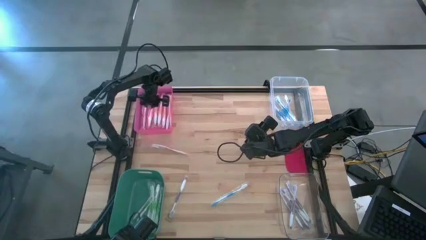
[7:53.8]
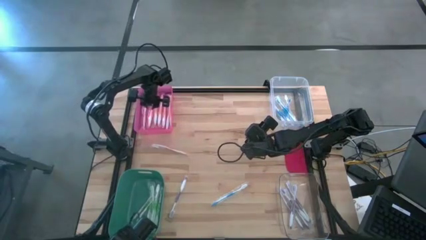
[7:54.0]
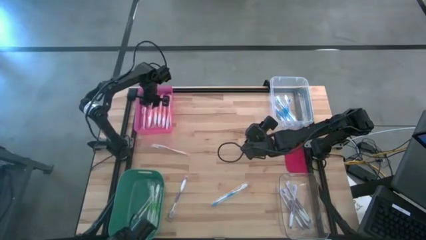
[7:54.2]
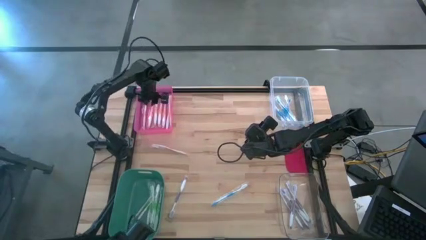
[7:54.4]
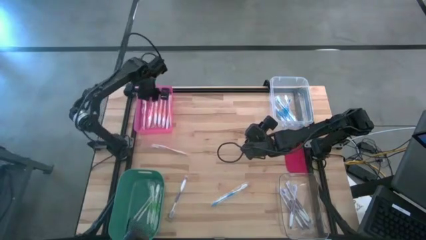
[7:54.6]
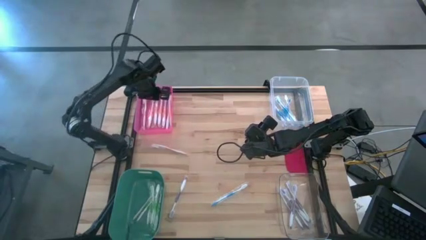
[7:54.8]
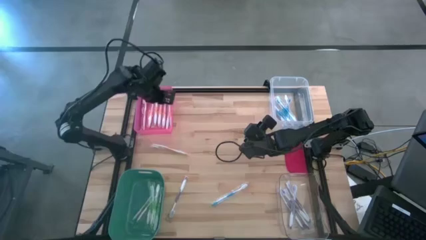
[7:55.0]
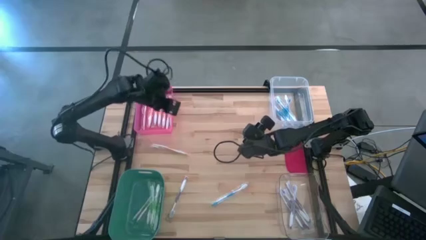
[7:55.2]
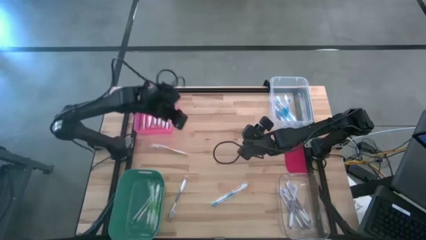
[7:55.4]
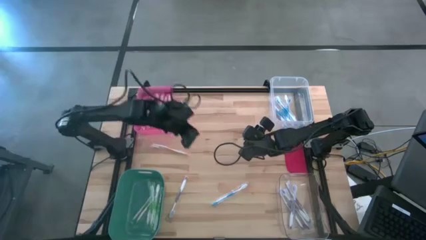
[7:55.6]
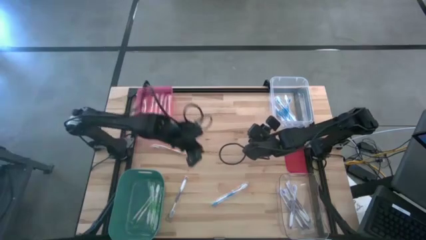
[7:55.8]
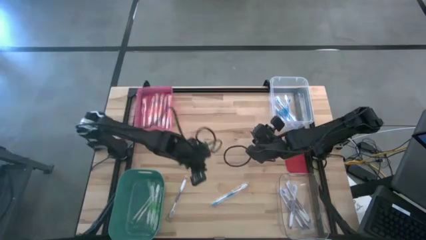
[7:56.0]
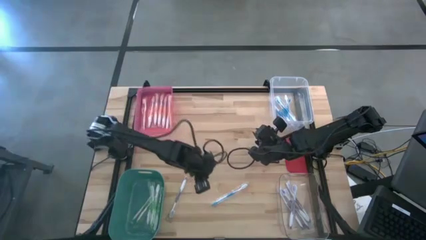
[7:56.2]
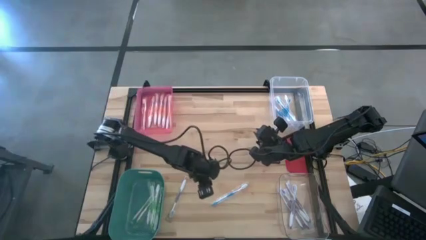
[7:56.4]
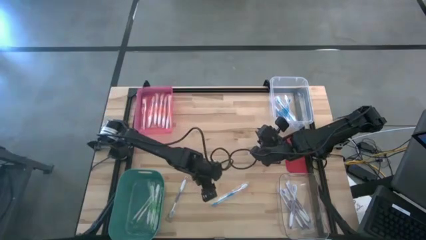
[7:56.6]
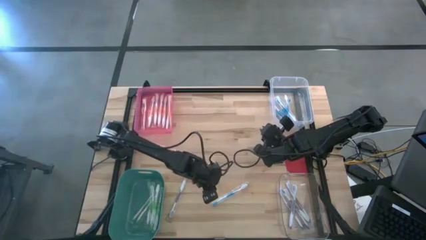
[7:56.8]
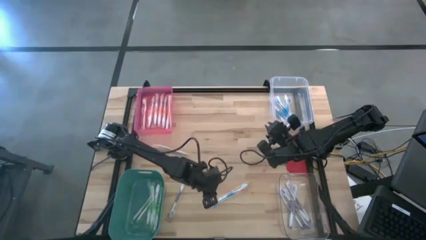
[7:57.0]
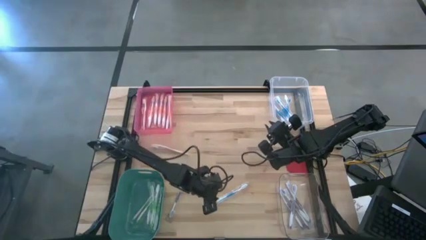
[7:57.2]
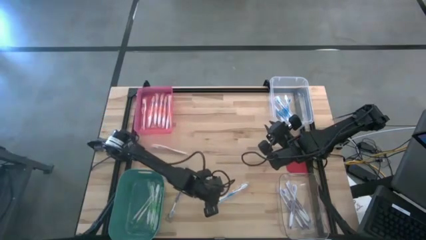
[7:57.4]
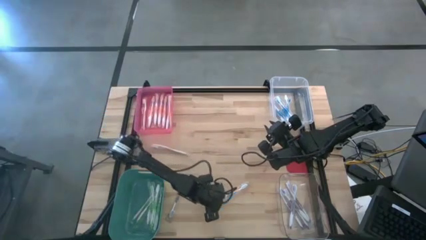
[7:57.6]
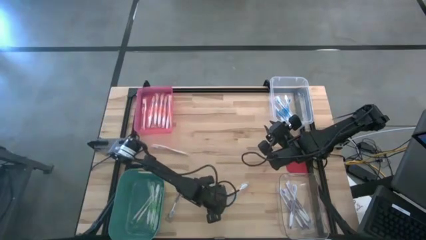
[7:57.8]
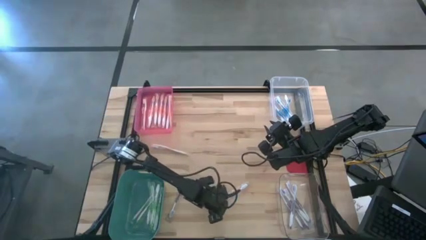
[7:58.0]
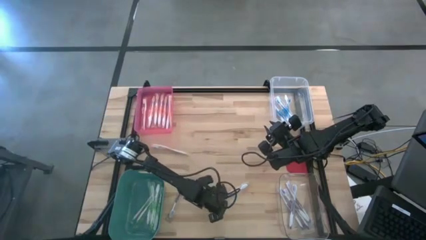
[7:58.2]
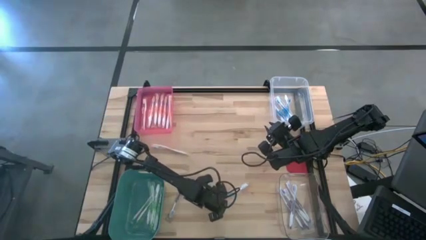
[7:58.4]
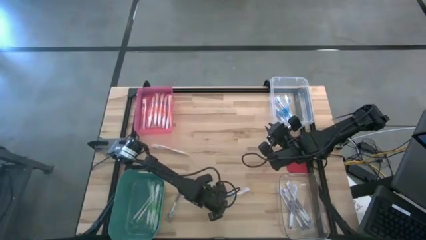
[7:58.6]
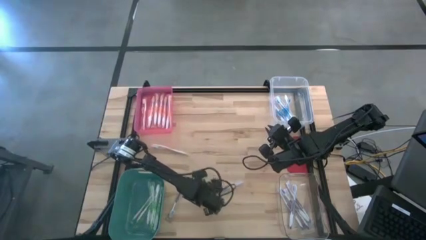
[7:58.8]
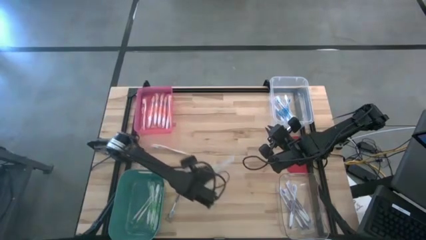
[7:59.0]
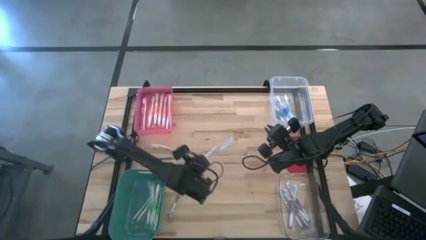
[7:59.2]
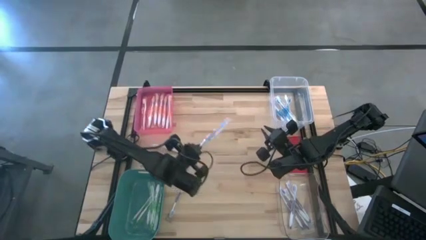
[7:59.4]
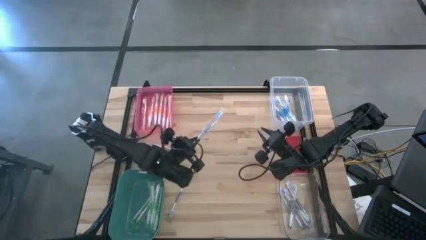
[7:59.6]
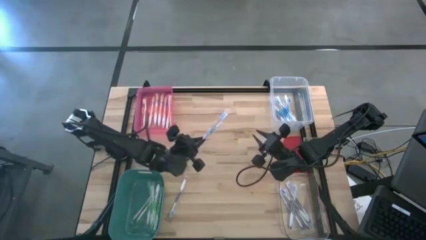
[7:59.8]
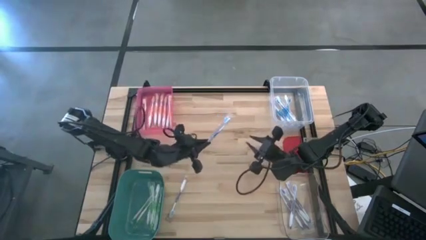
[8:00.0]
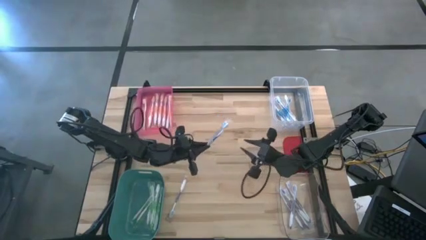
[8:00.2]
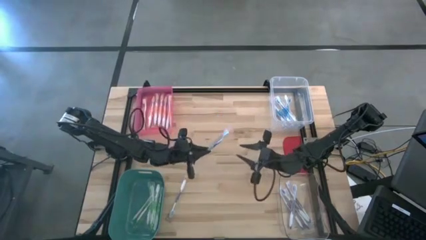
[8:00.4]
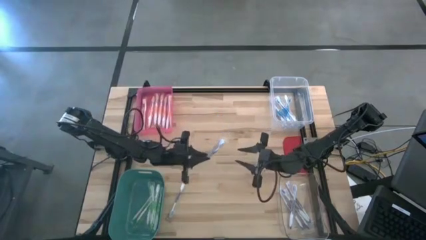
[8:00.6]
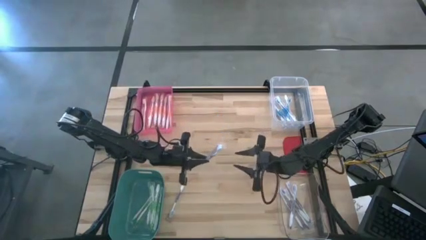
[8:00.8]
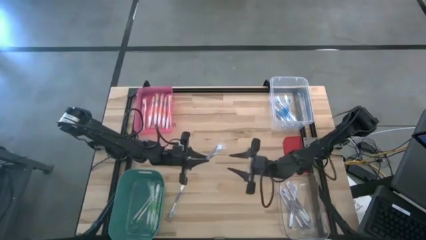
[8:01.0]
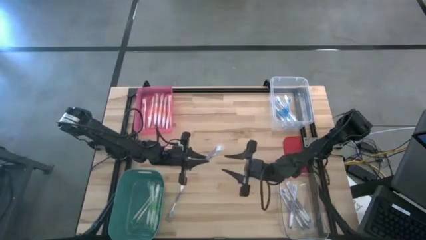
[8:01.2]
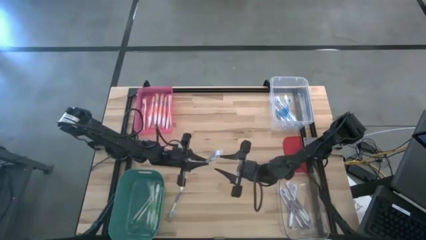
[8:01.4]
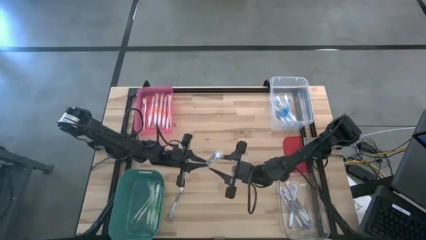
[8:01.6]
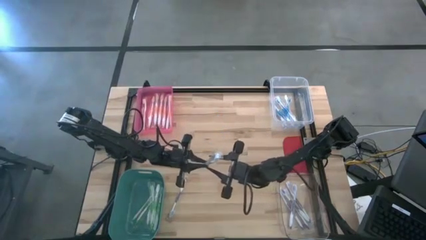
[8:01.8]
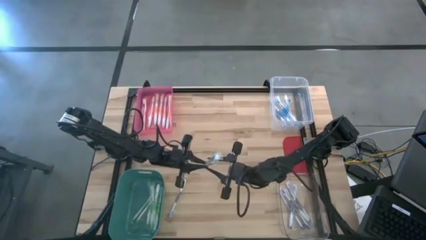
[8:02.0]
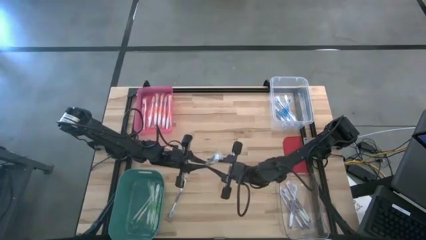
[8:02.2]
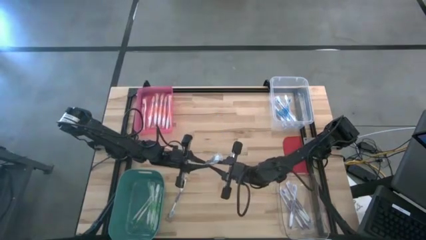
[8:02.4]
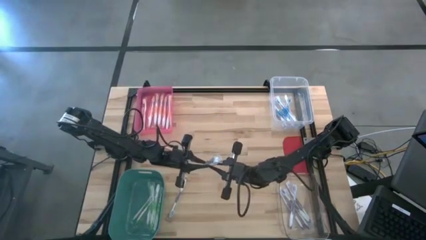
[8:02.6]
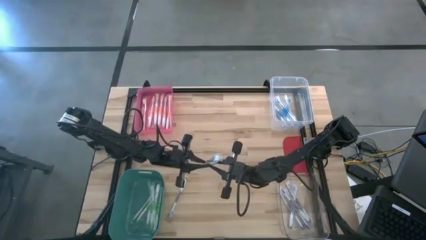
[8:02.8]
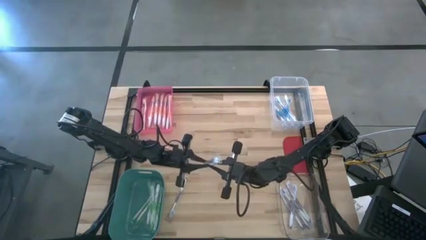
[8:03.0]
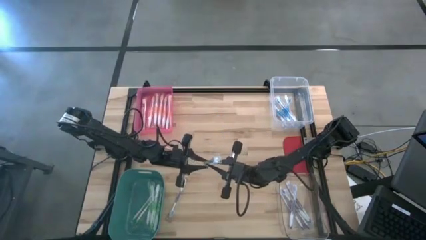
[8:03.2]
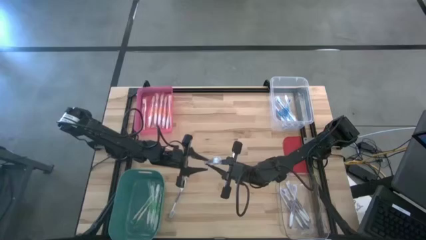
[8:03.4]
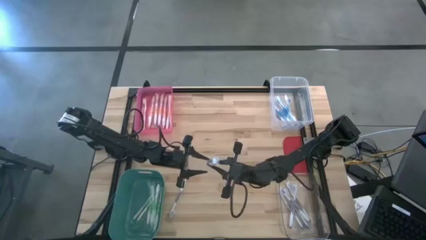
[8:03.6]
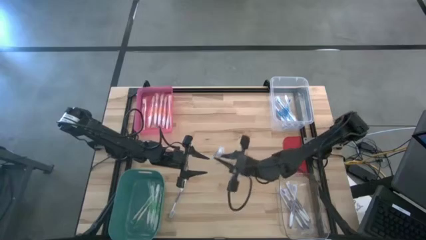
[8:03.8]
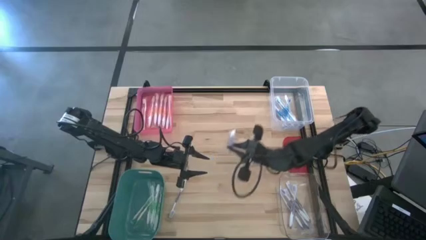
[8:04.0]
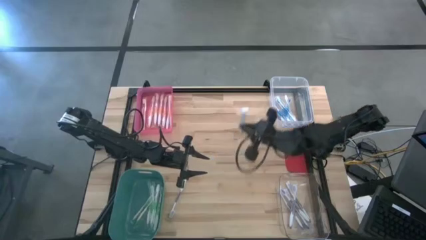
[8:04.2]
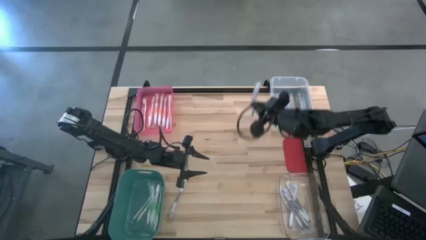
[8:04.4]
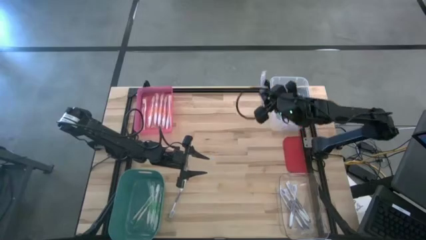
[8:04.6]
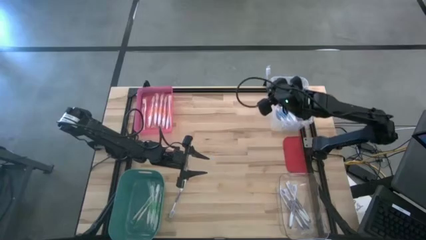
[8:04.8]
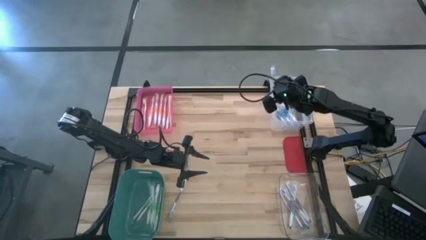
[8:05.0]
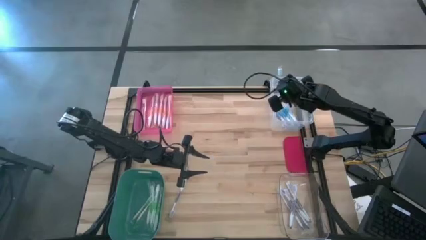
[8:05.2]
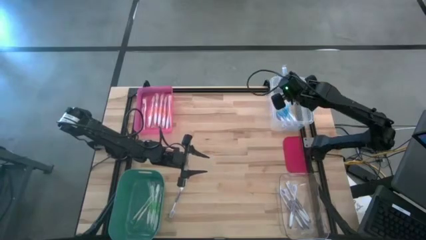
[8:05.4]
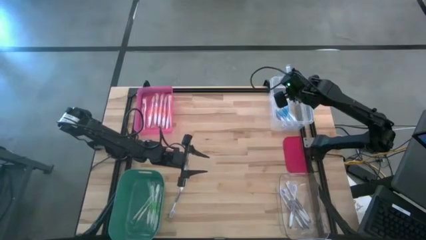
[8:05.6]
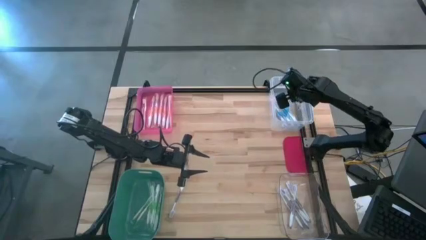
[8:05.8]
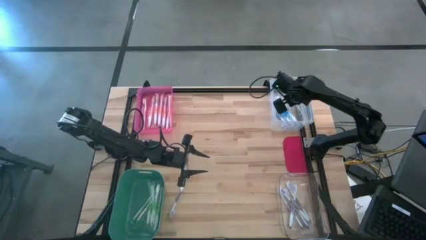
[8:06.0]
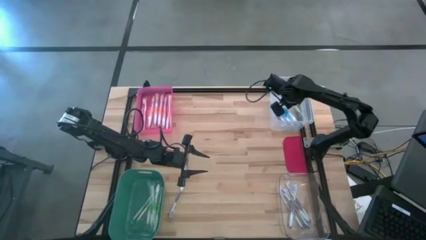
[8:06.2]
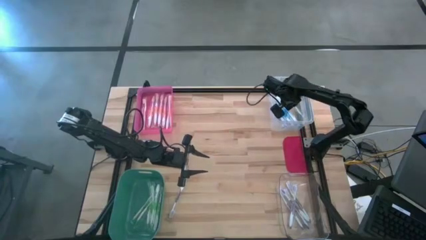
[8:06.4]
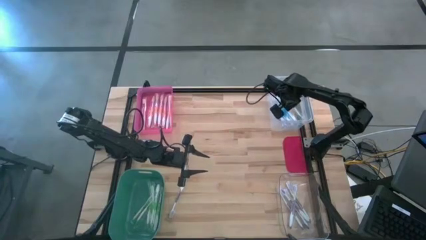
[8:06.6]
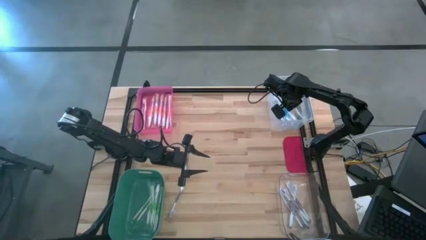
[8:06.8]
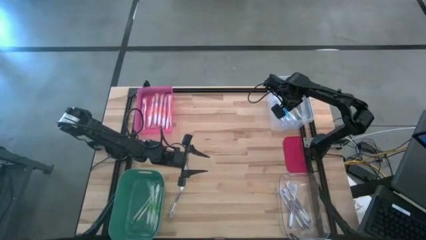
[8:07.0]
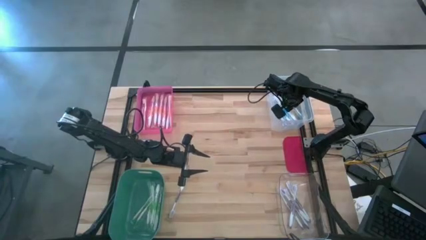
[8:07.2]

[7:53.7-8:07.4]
Task: Pick & Place Toothbrushes
Put the blue toothbrush into the top transparent bin

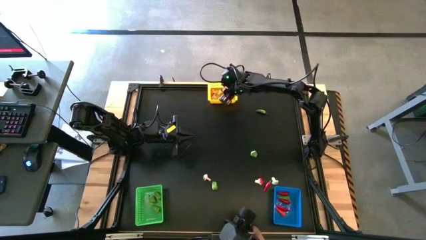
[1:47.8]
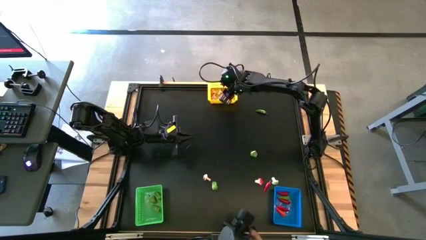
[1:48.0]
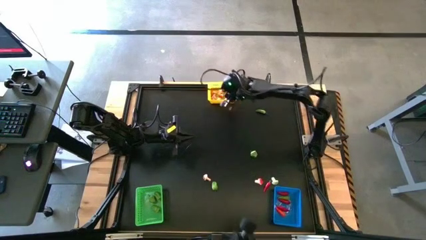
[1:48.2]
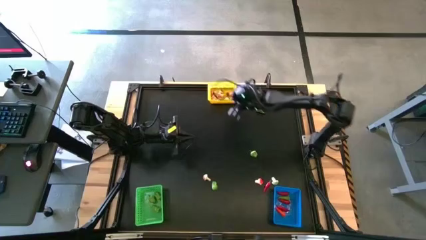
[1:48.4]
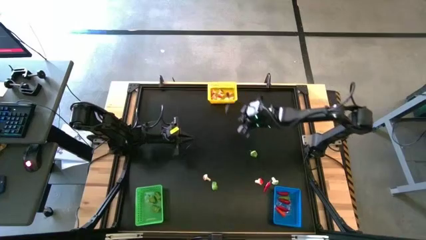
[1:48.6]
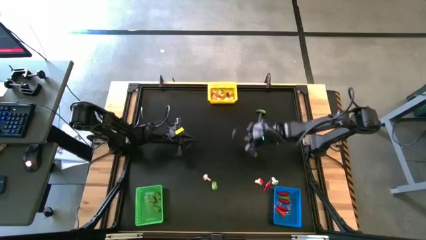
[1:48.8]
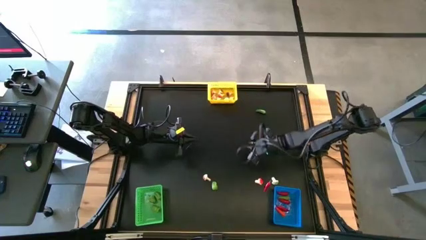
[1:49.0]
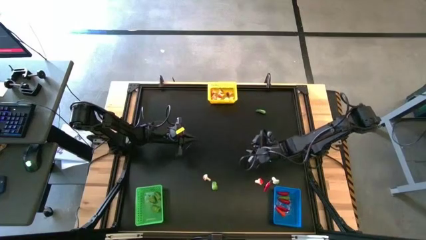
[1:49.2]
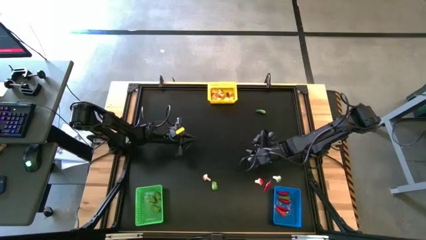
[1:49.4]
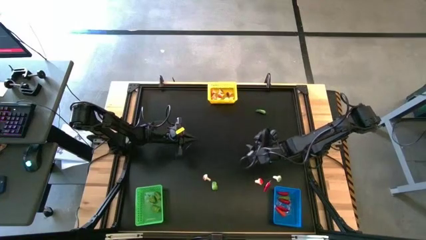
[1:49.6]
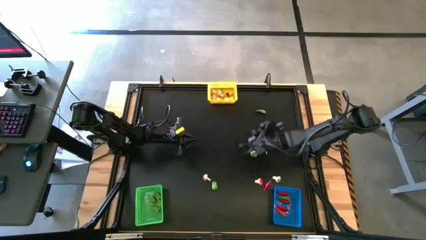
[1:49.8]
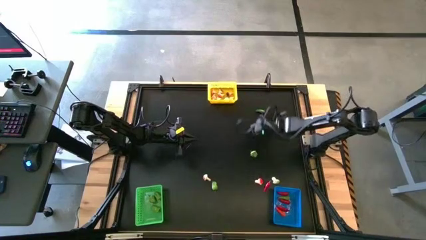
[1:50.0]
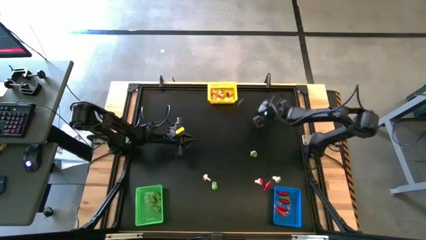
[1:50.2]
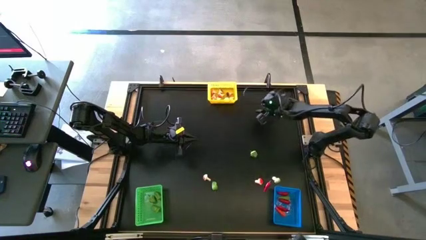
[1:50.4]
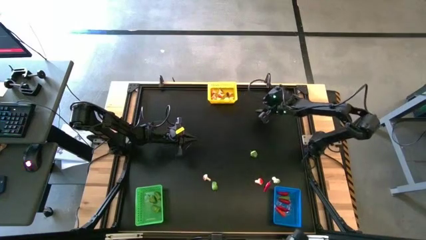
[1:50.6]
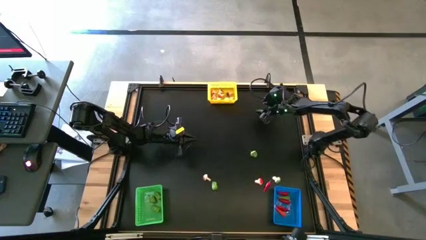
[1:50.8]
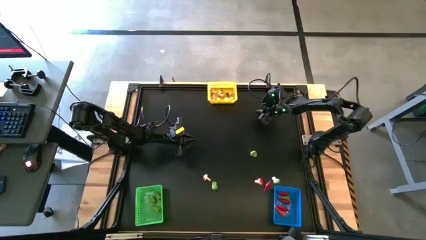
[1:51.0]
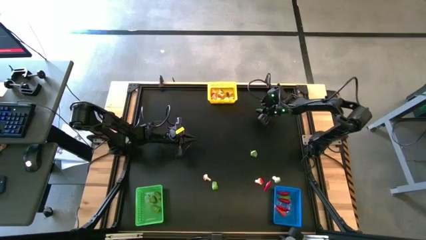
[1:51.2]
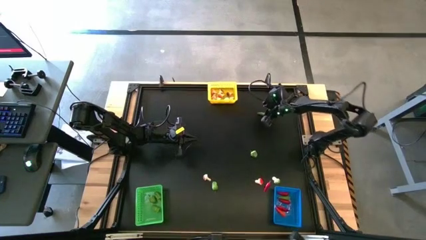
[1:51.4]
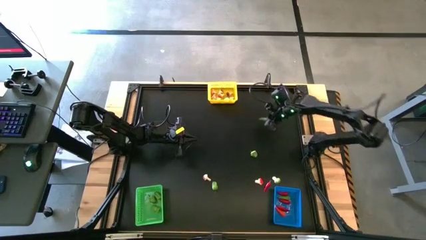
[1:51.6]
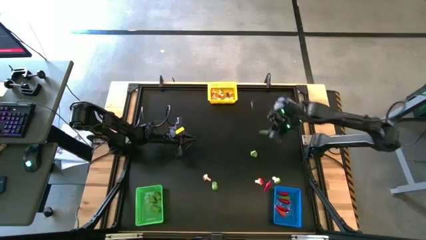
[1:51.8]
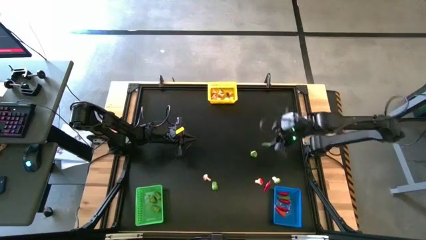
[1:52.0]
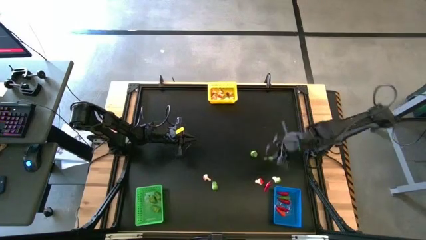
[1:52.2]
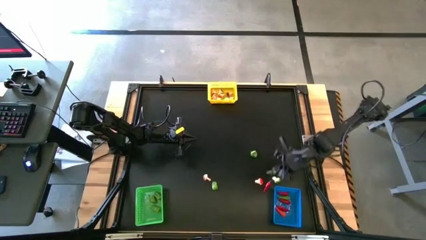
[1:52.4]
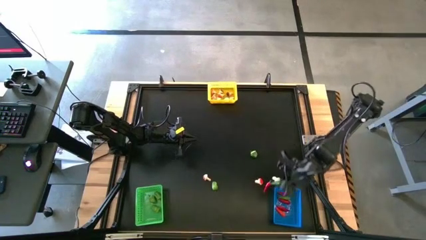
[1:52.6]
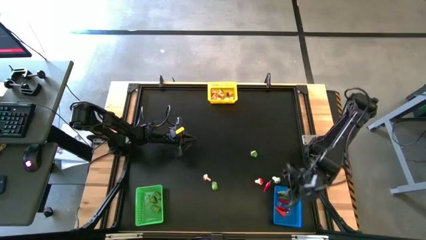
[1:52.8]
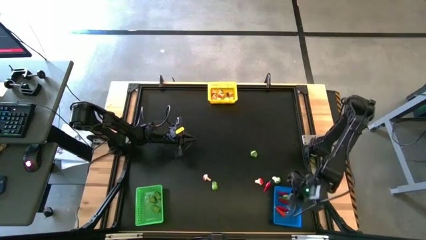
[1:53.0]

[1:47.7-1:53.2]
Task: Sort produce into baskets
Put the top green chili into the blue bin
